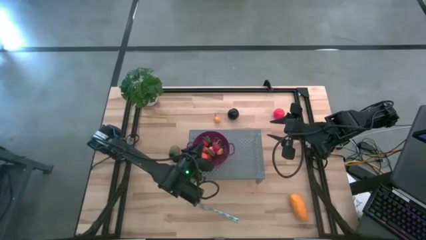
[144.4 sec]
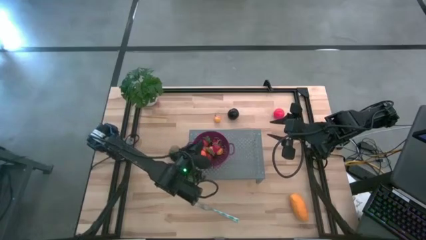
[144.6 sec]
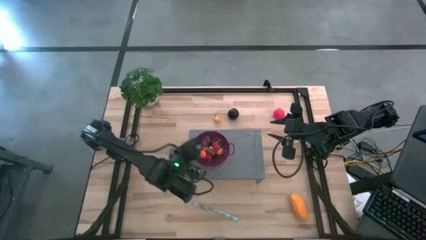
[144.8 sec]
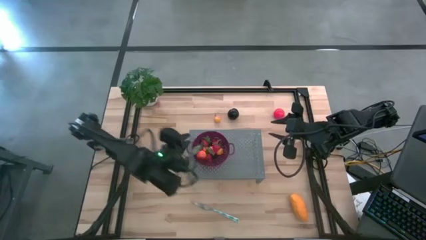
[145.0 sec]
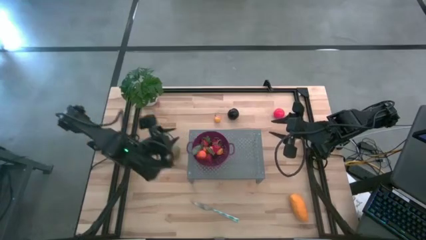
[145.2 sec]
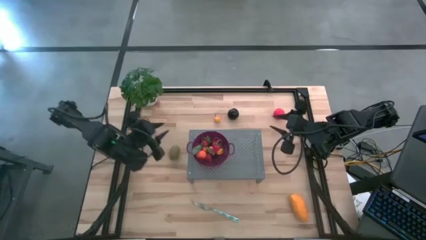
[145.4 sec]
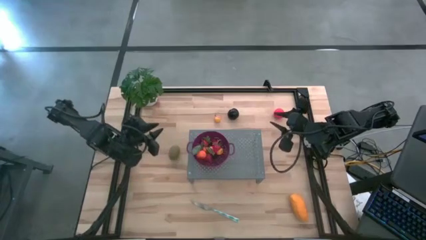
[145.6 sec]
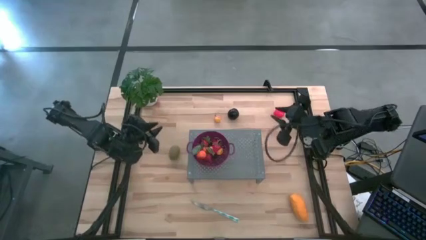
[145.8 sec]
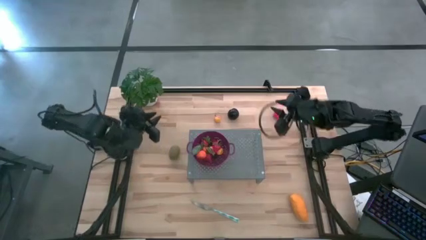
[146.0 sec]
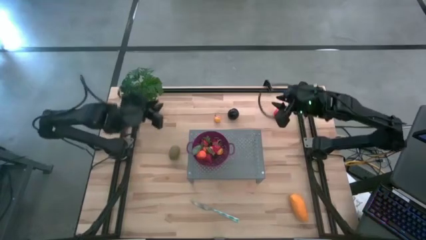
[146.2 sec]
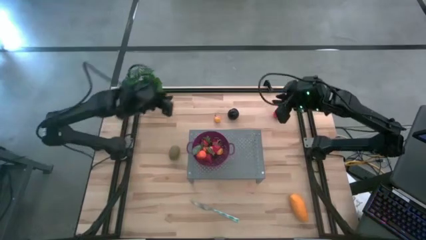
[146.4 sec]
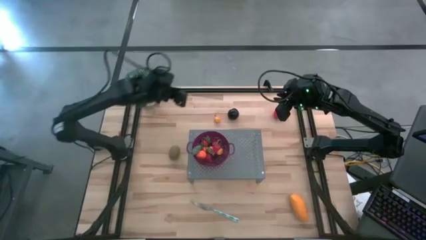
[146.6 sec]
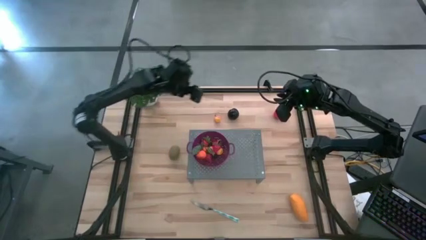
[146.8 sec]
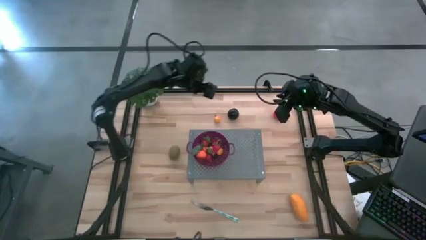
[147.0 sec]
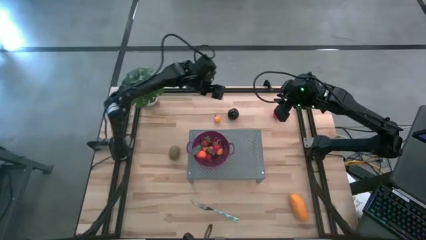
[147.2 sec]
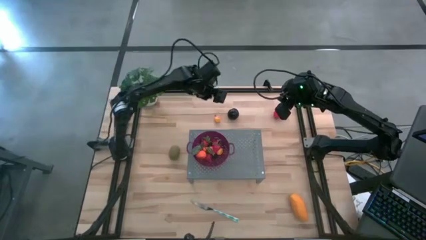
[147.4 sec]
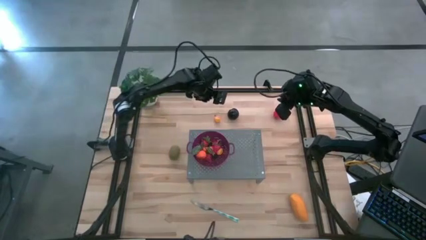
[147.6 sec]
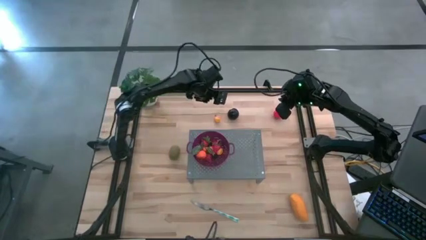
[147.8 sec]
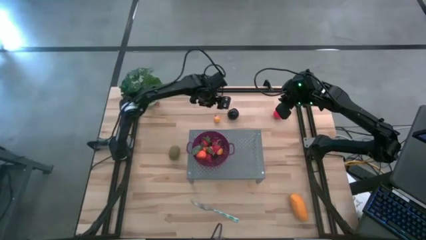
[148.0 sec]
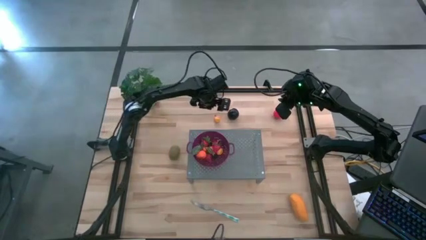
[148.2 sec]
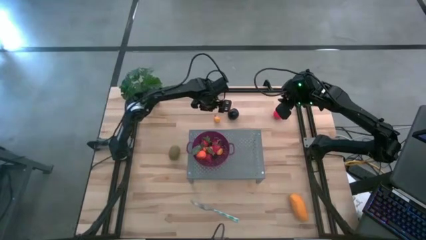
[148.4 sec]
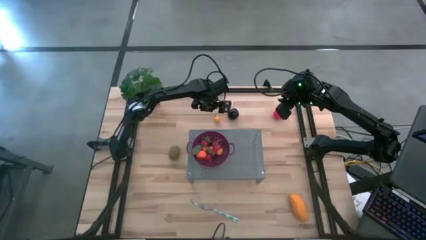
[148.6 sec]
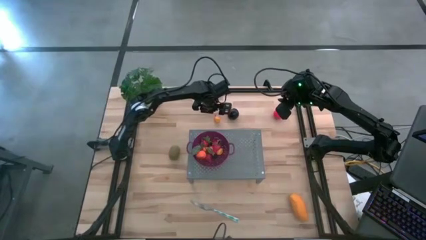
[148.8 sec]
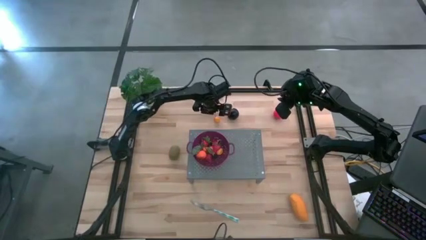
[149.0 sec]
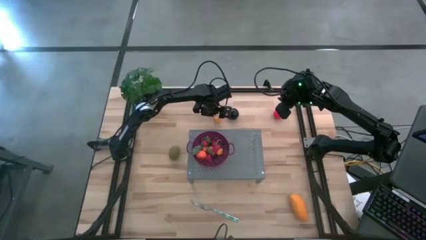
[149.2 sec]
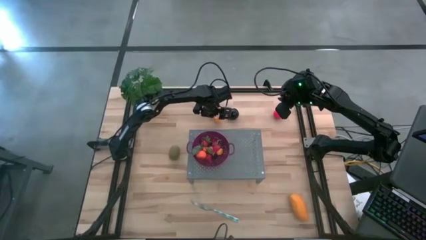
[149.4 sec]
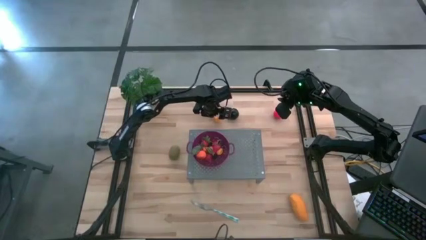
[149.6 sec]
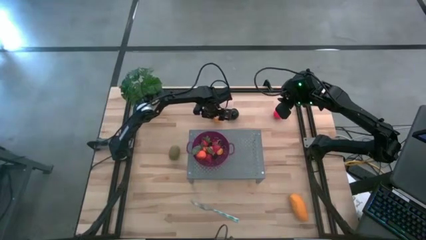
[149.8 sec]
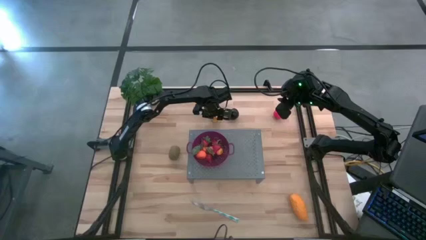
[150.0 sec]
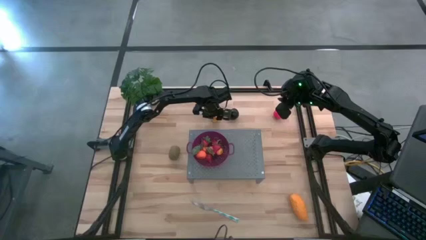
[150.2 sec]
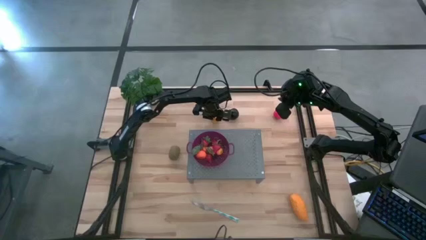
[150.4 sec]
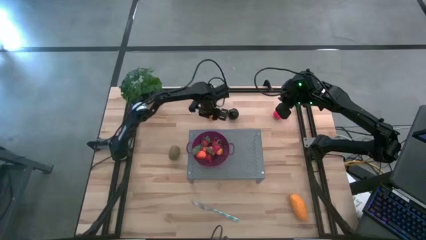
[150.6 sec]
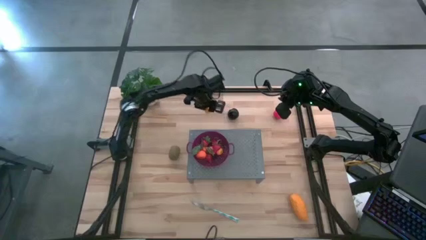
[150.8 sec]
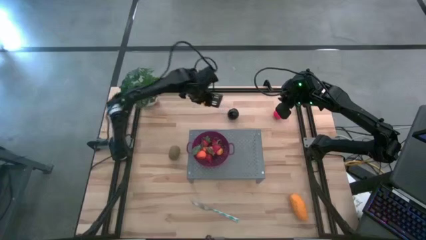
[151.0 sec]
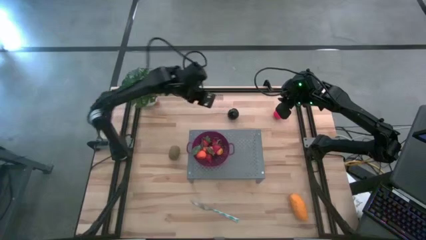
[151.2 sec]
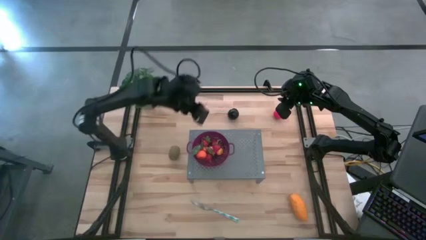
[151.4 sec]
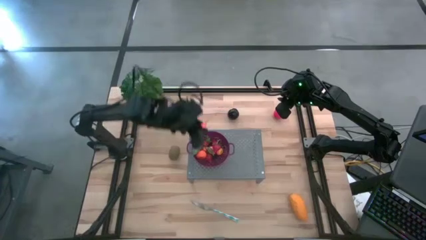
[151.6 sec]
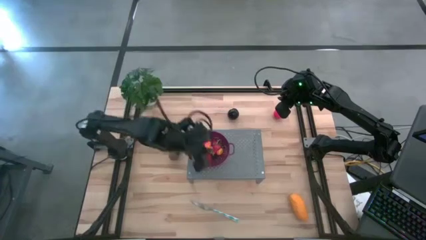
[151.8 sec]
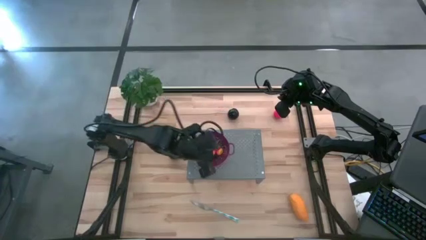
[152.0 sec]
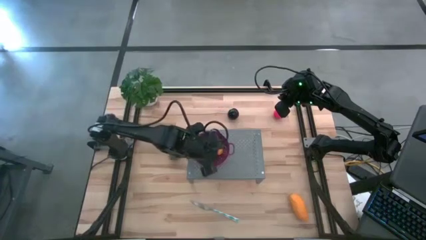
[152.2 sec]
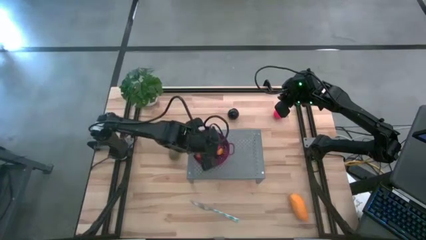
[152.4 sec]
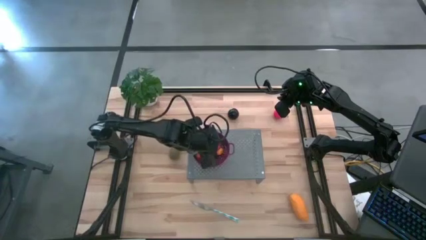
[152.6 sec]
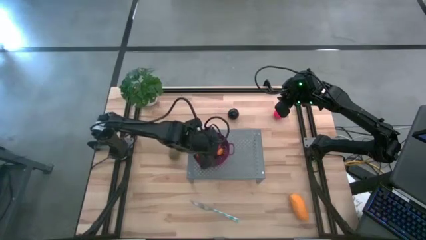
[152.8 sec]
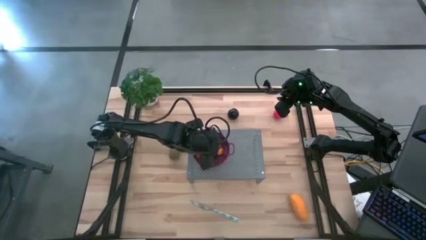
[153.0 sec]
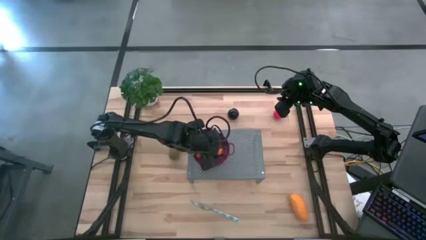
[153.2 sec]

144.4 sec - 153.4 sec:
Task: Pick & Place Fruit
Put the pear into the purple strainer bowl

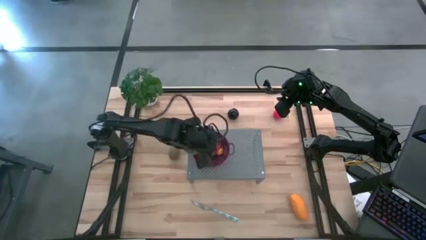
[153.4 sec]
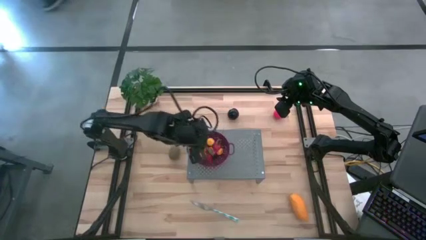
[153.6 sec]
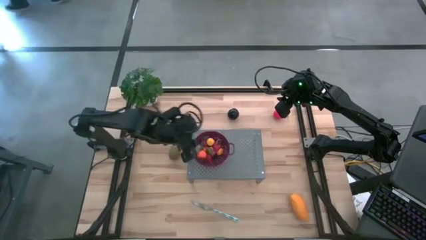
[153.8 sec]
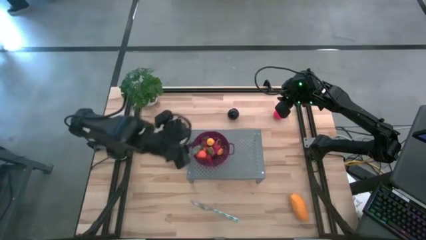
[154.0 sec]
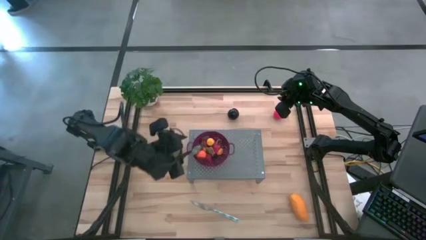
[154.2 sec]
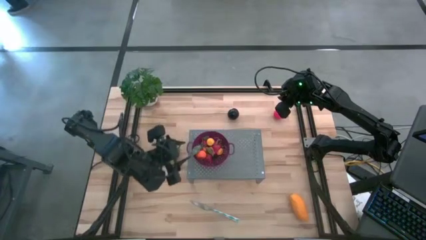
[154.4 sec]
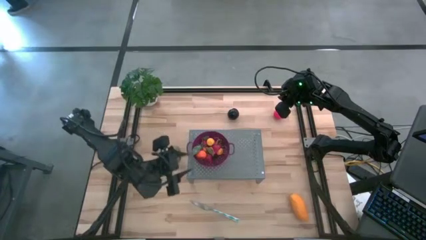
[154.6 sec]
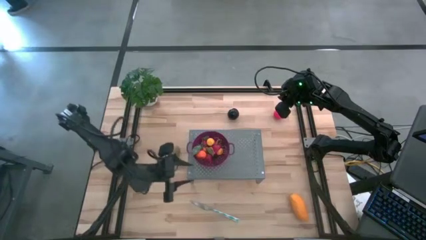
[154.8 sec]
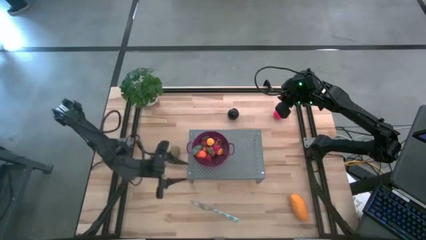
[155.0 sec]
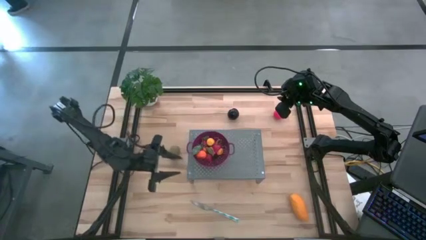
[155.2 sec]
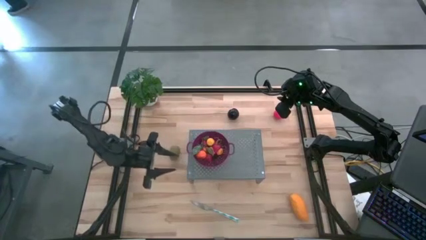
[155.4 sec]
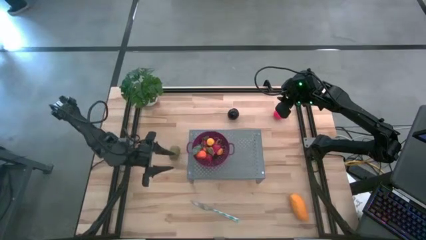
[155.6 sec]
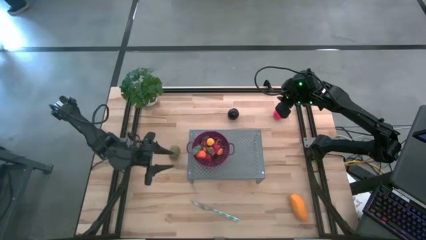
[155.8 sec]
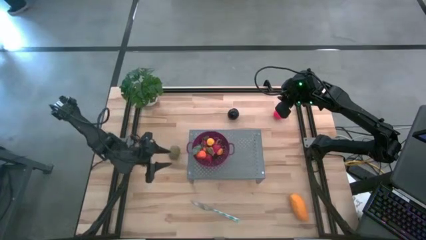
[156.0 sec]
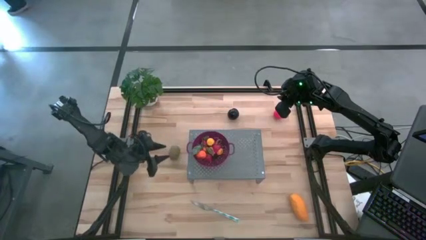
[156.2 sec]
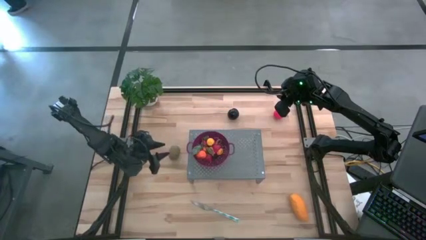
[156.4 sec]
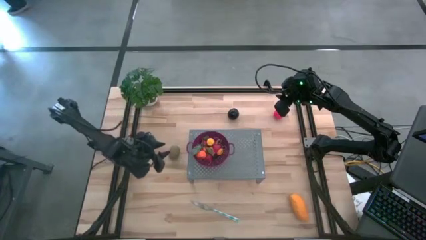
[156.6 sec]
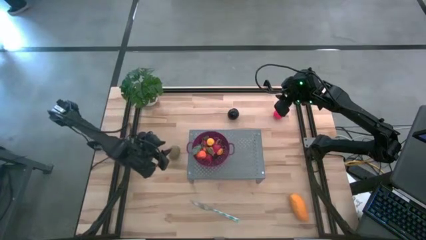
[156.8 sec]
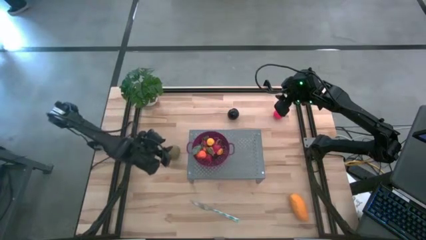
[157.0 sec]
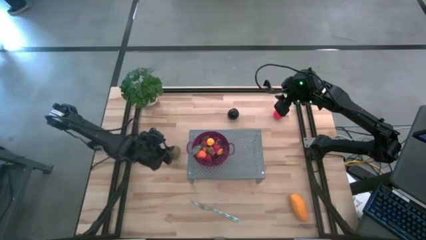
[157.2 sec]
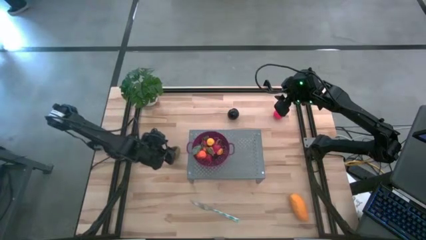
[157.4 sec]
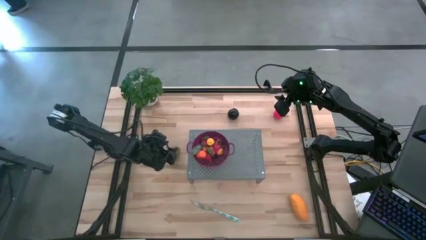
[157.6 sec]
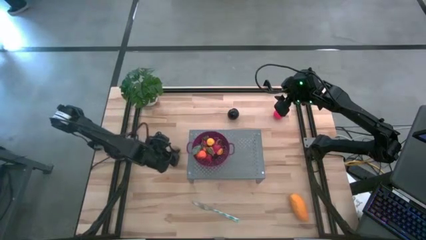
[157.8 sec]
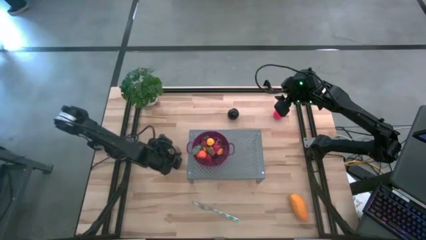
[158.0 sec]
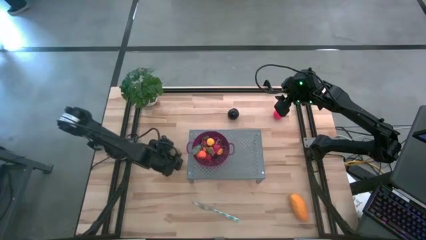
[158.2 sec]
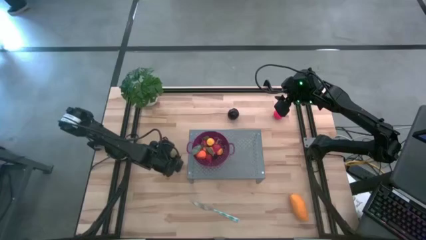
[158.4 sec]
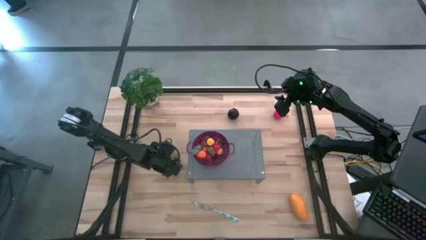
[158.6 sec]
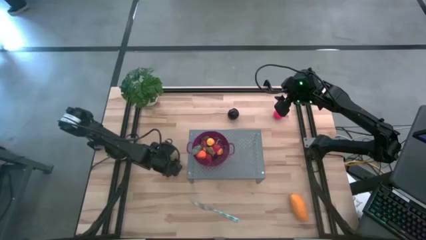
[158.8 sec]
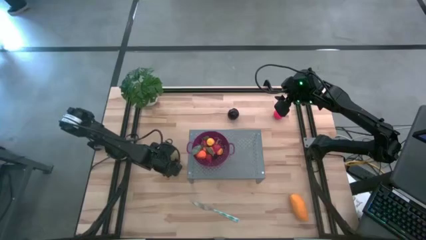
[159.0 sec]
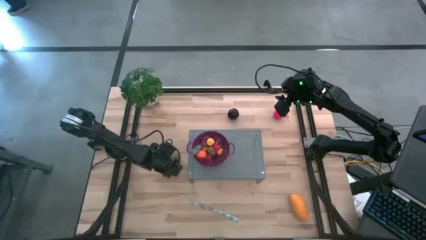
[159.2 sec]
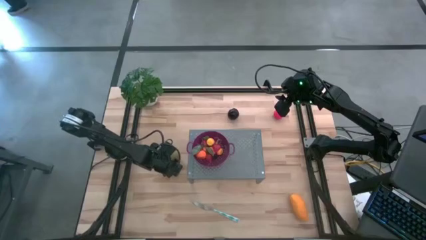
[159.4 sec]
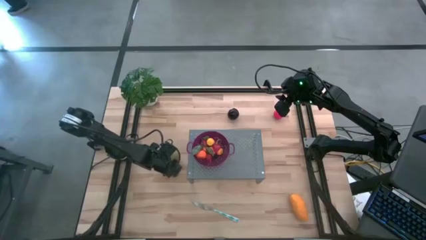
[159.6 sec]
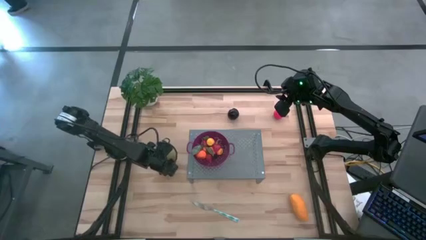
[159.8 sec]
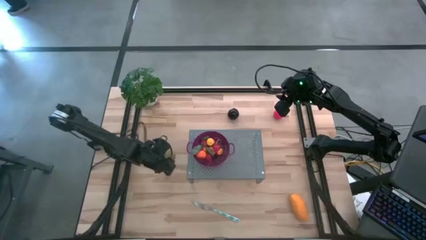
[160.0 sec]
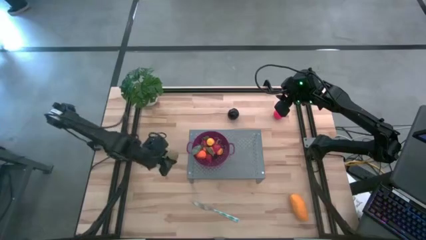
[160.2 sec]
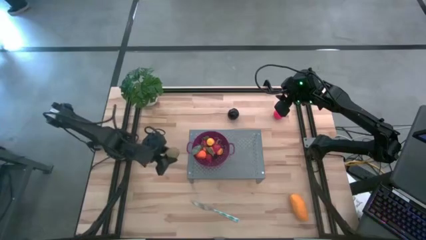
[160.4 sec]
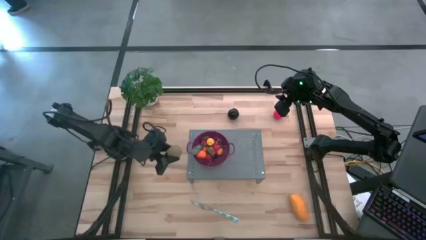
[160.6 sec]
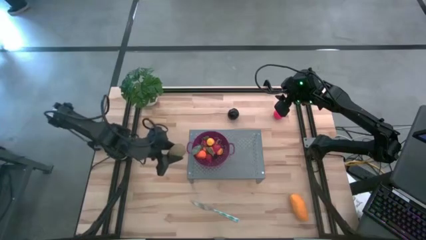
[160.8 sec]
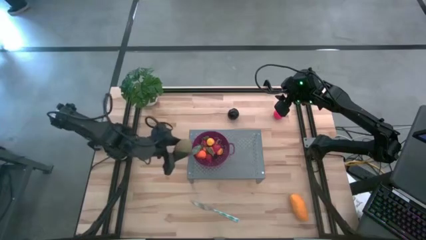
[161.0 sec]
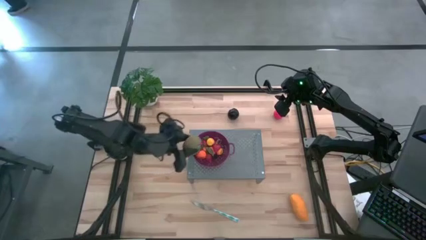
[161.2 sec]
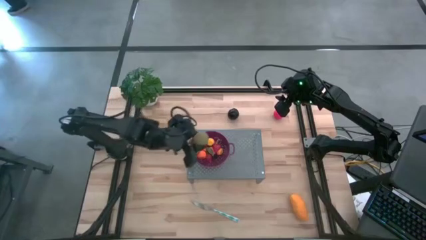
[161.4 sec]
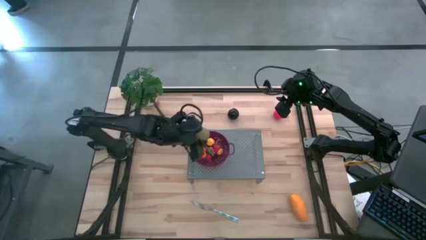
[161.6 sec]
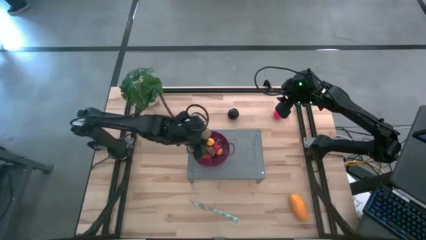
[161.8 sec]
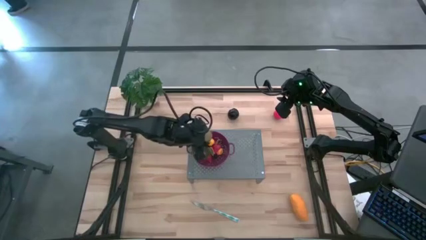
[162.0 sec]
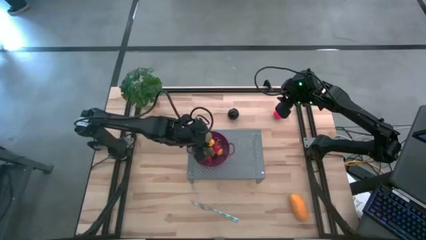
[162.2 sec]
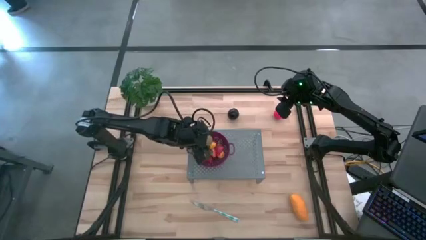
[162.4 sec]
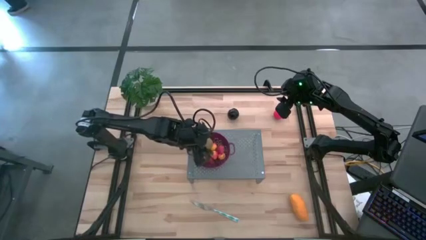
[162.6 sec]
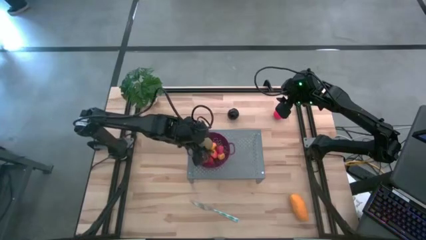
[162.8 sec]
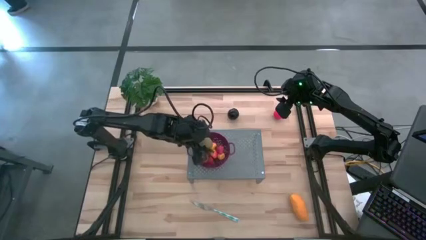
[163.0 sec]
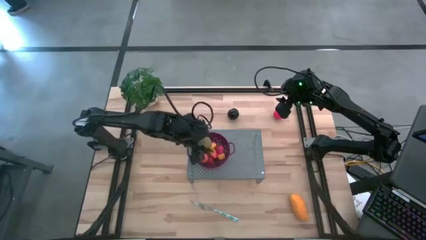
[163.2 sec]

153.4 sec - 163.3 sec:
Put the kiwi into the purple strainer bowl
